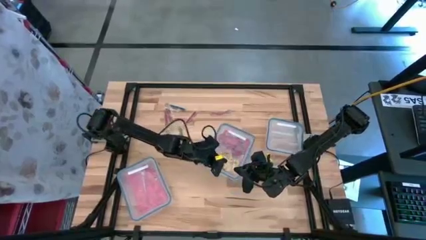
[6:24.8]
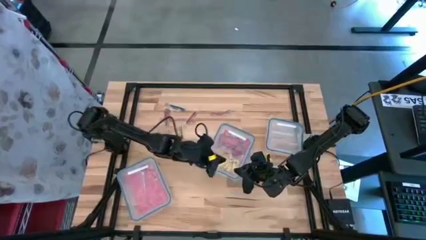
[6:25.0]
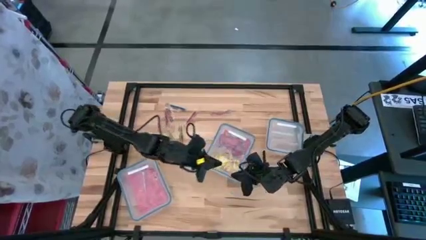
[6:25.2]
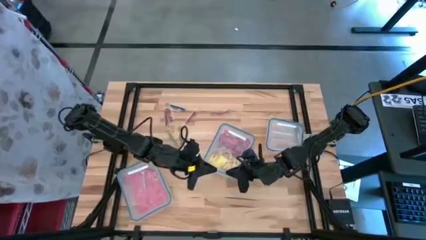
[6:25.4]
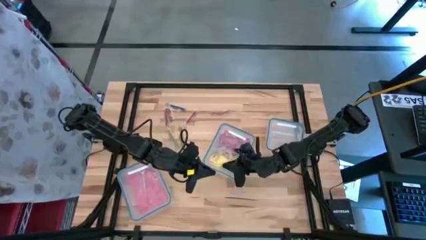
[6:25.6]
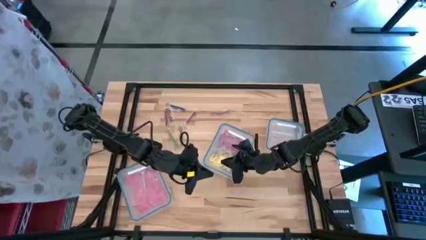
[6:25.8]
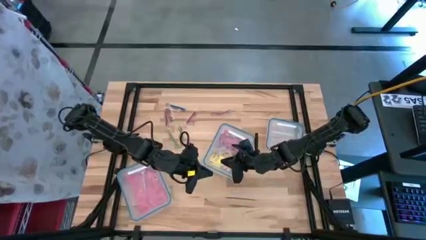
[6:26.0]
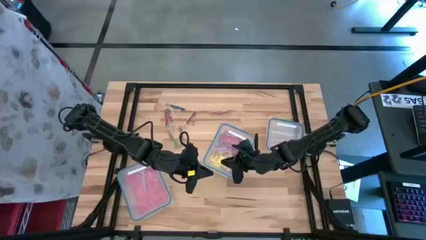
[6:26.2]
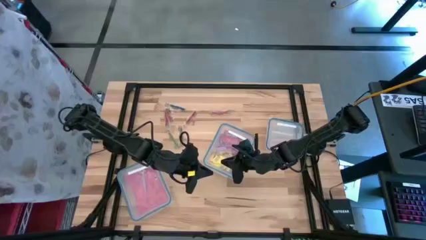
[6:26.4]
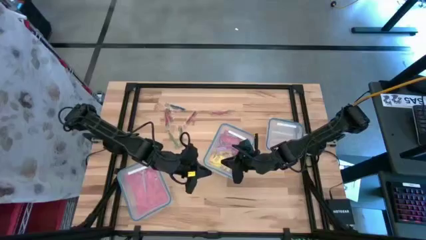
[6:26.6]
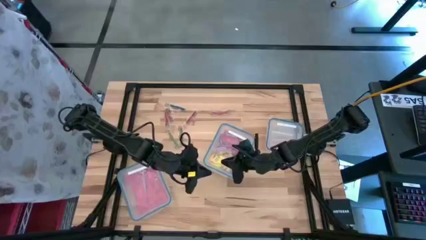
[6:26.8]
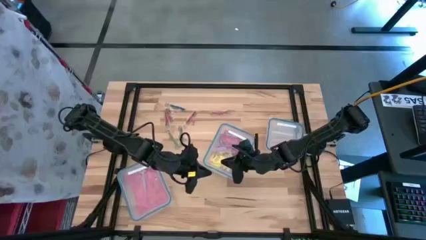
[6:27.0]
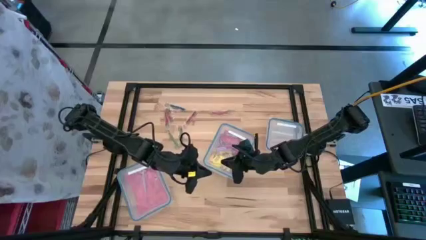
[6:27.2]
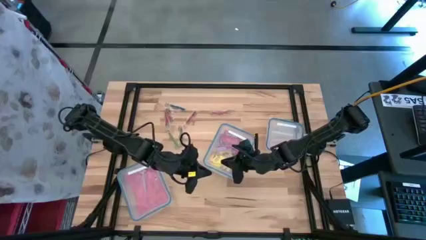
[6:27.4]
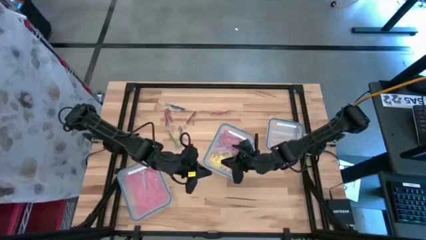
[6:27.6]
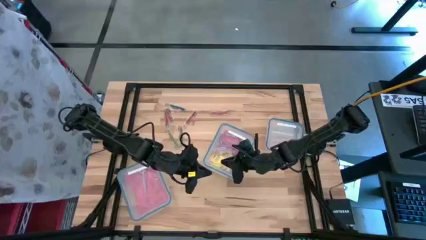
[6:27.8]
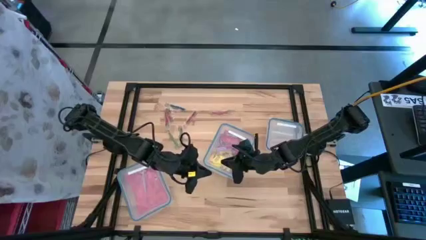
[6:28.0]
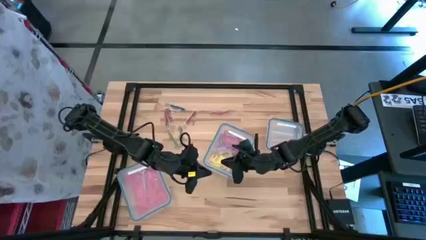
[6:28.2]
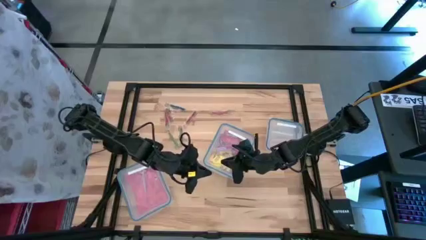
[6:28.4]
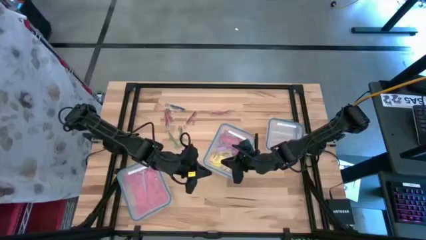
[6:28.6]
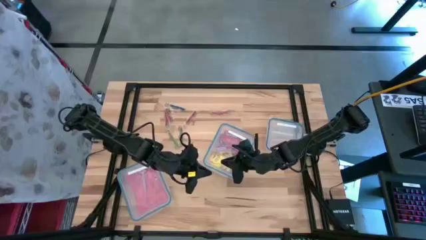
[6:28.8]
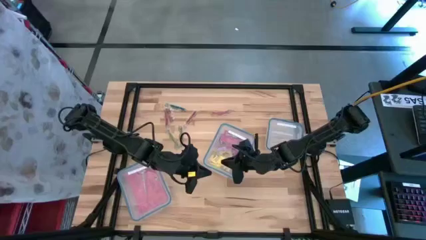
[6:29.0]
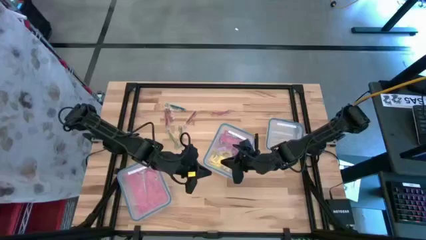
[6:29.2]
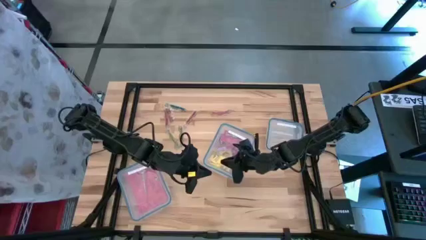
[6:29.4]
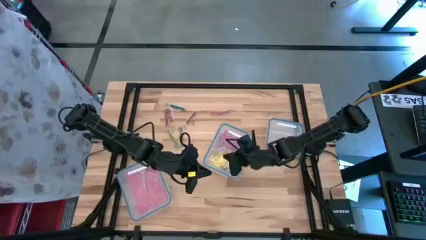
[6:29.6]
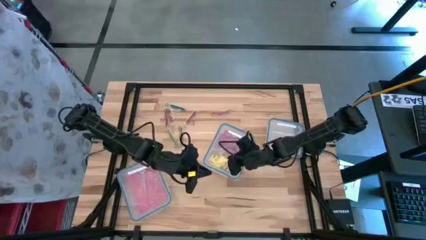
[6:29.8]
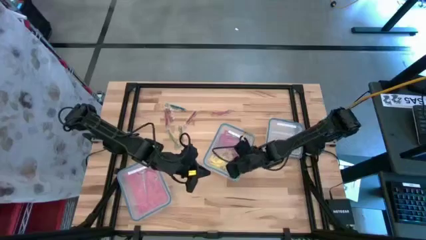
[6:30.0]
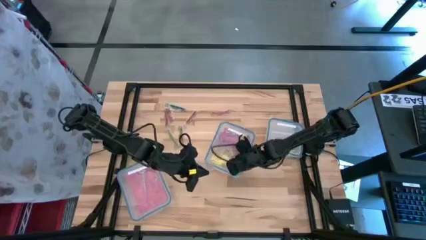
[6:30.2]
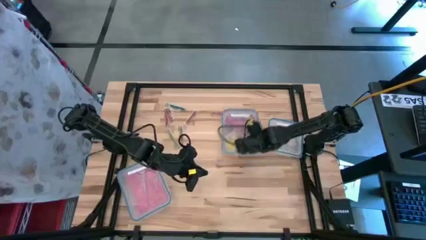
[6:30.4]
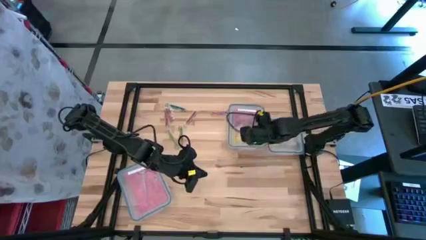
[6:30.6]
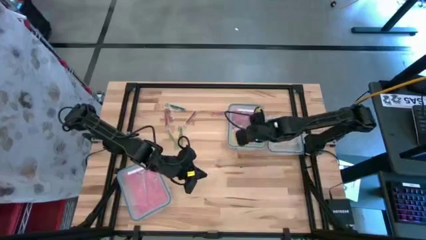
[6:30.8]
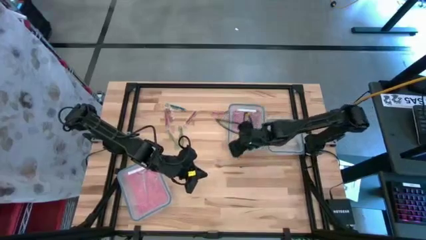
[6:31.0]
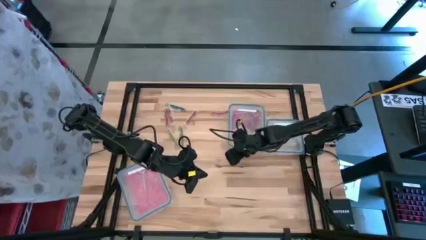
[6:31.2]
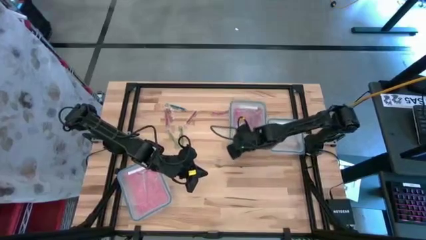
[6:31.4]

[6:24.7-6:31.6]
Task: Sort candy
Move the rectangular transparent bin

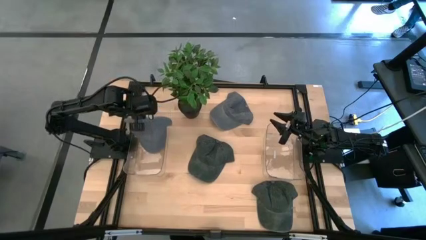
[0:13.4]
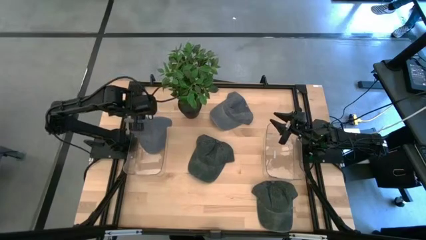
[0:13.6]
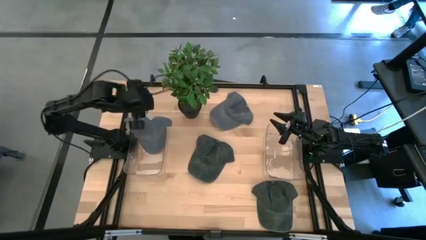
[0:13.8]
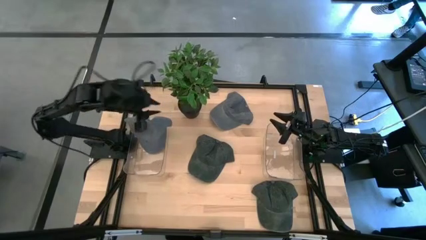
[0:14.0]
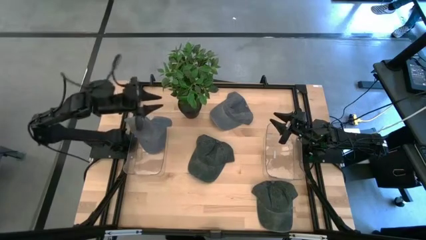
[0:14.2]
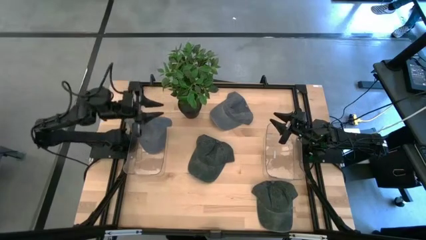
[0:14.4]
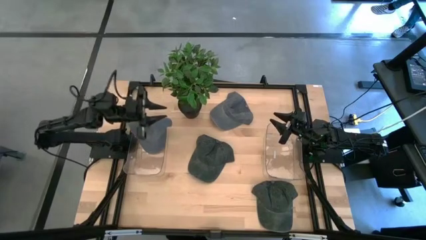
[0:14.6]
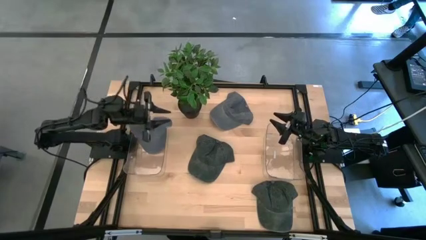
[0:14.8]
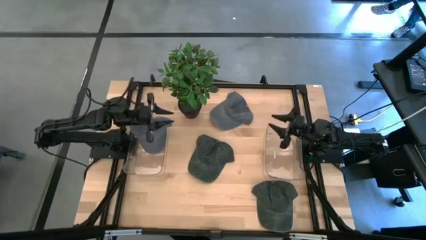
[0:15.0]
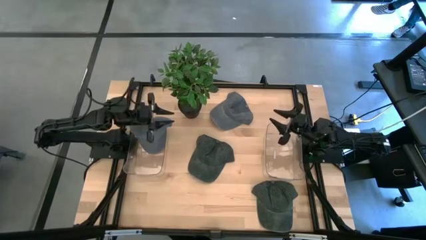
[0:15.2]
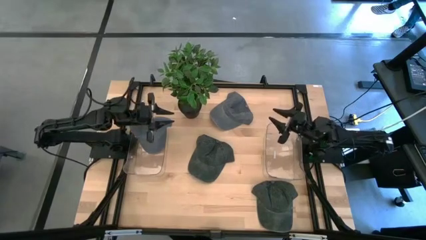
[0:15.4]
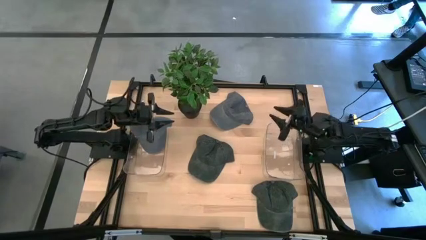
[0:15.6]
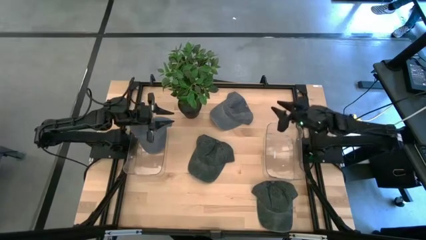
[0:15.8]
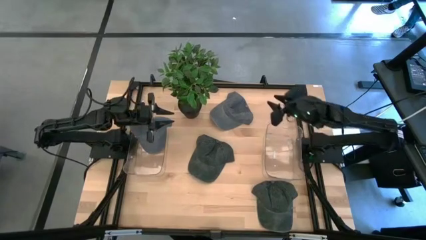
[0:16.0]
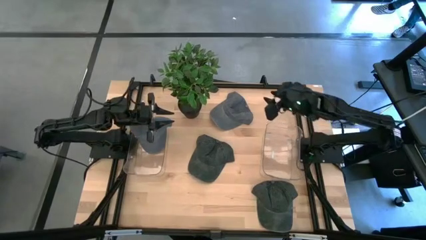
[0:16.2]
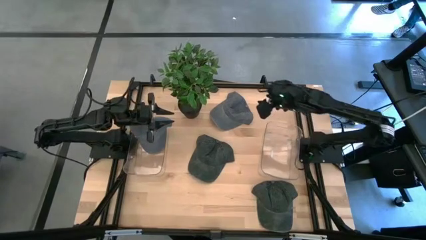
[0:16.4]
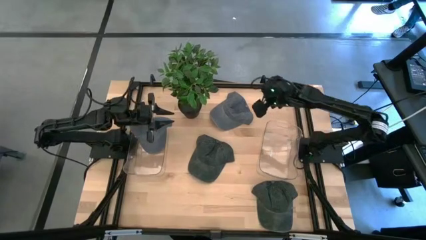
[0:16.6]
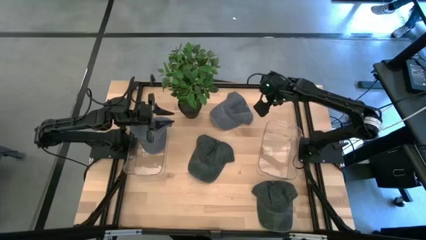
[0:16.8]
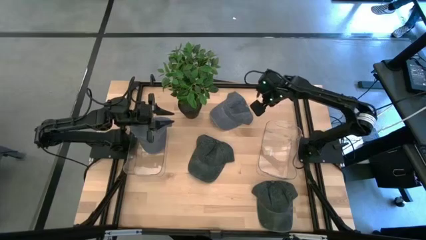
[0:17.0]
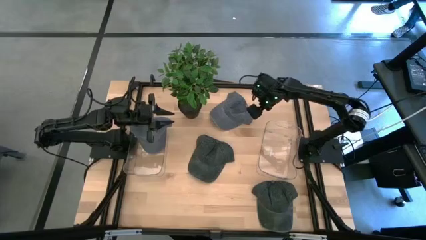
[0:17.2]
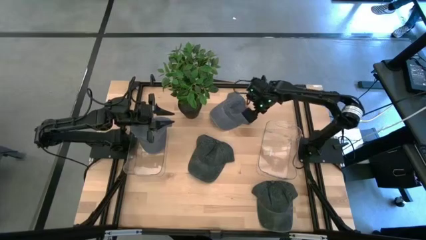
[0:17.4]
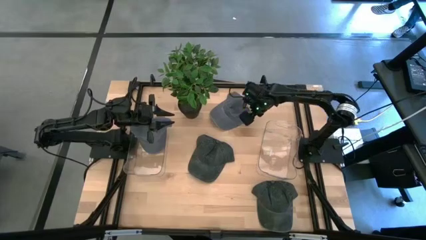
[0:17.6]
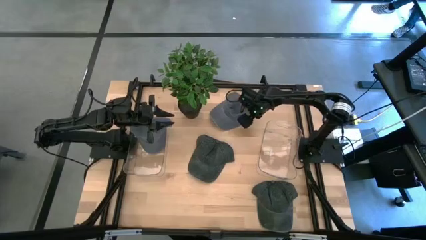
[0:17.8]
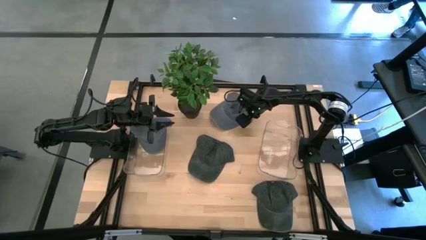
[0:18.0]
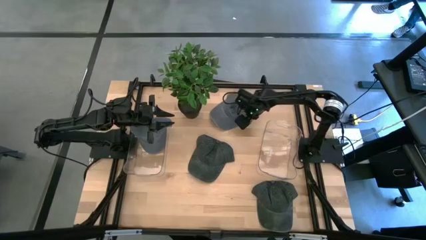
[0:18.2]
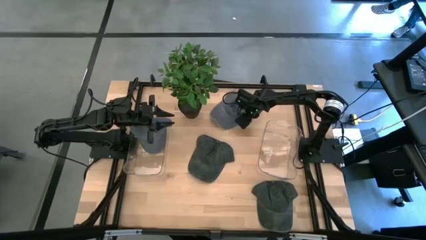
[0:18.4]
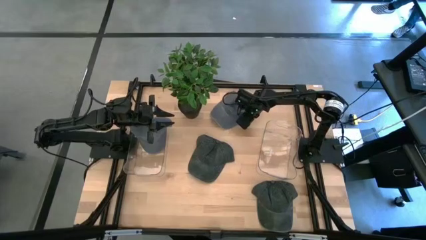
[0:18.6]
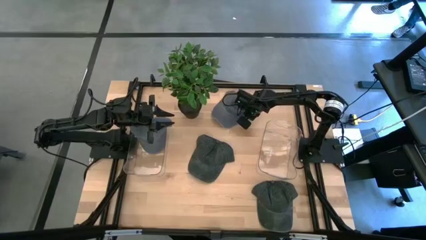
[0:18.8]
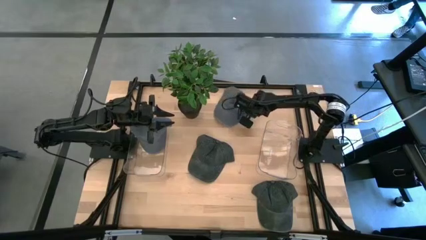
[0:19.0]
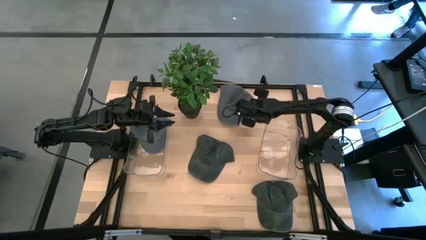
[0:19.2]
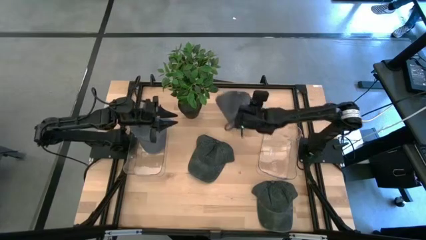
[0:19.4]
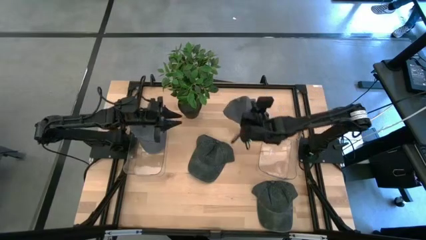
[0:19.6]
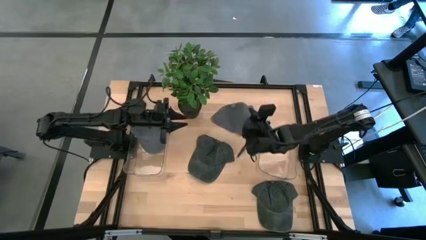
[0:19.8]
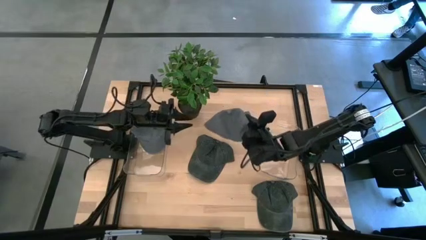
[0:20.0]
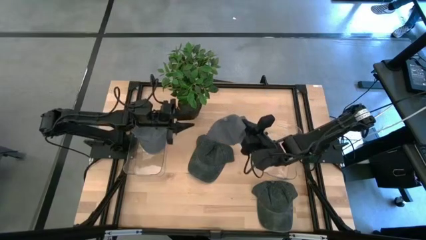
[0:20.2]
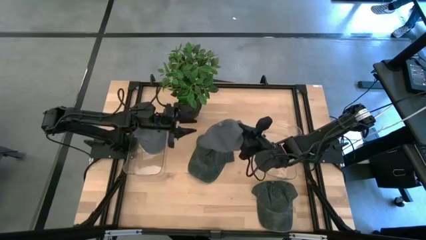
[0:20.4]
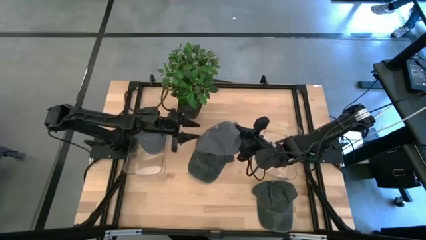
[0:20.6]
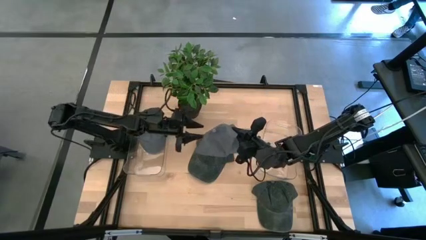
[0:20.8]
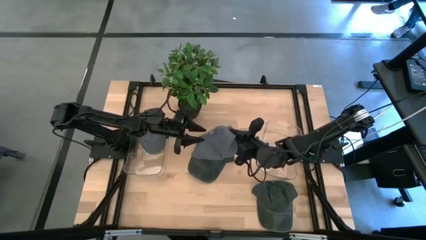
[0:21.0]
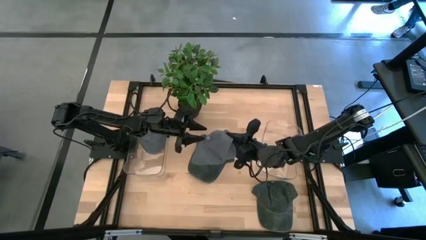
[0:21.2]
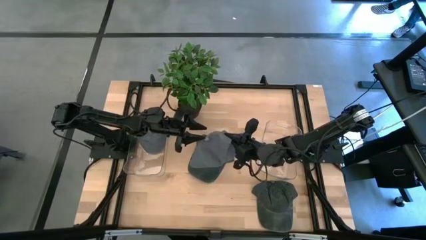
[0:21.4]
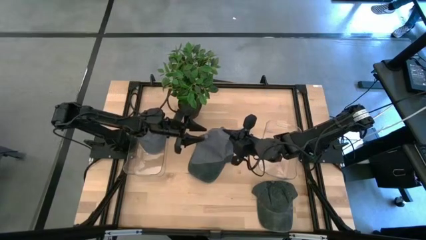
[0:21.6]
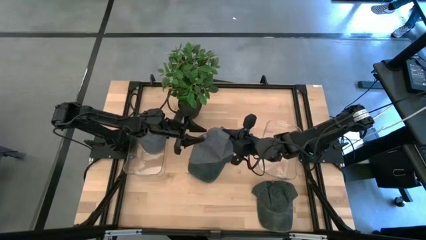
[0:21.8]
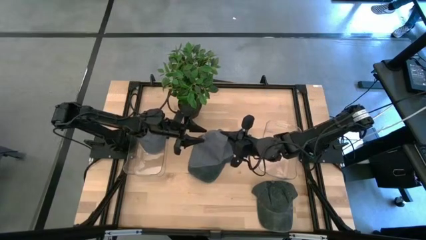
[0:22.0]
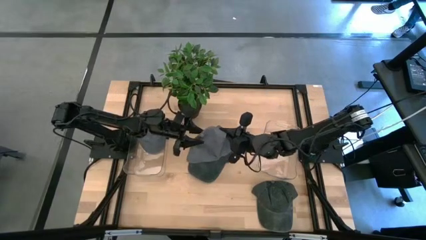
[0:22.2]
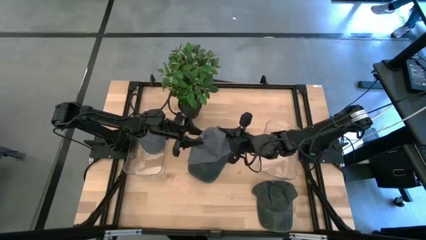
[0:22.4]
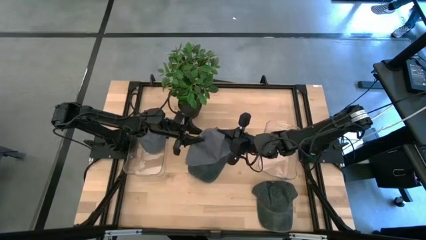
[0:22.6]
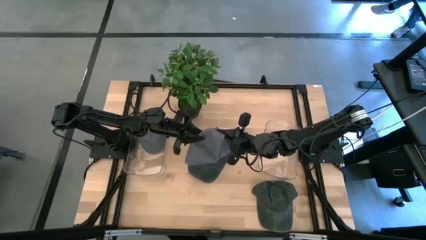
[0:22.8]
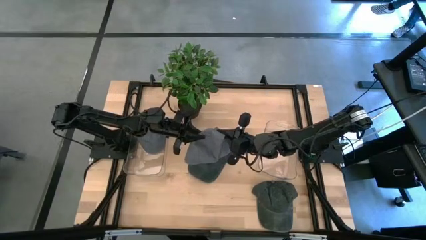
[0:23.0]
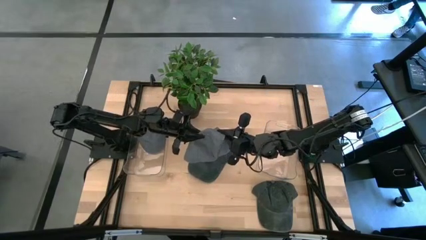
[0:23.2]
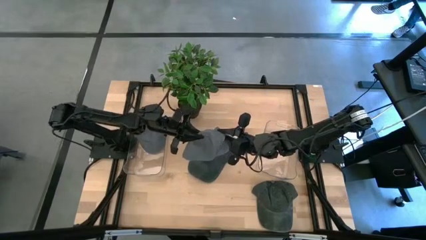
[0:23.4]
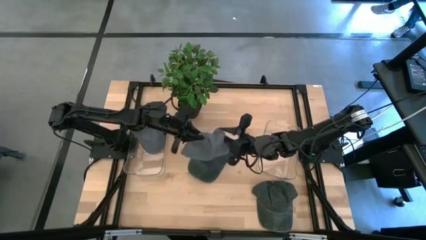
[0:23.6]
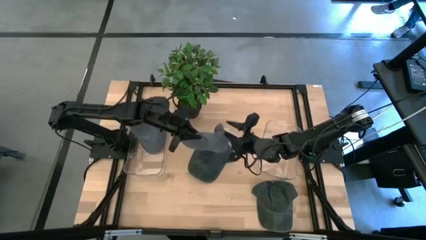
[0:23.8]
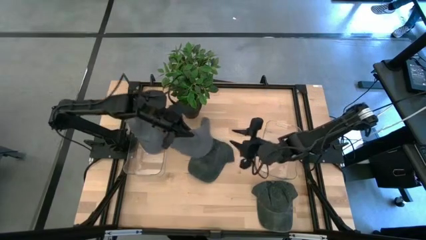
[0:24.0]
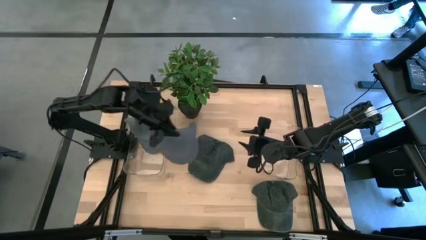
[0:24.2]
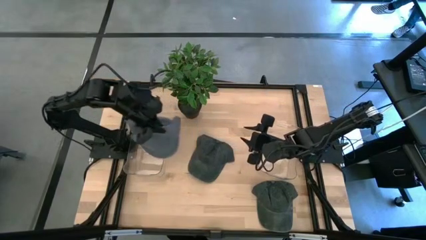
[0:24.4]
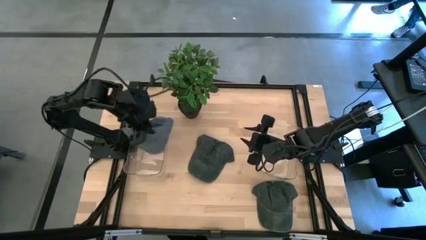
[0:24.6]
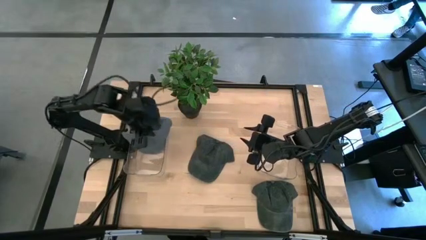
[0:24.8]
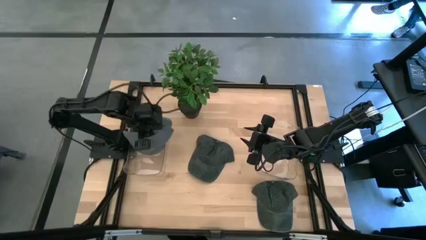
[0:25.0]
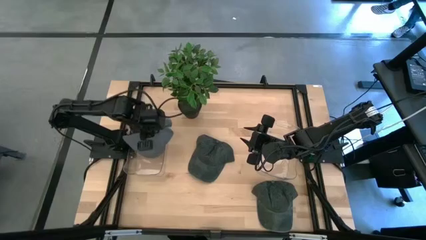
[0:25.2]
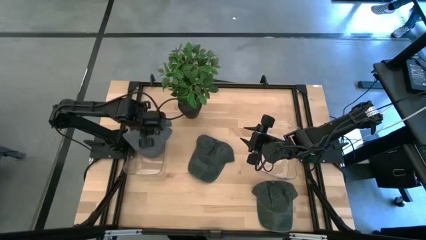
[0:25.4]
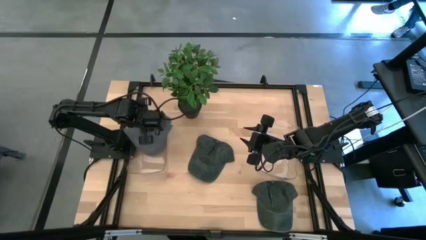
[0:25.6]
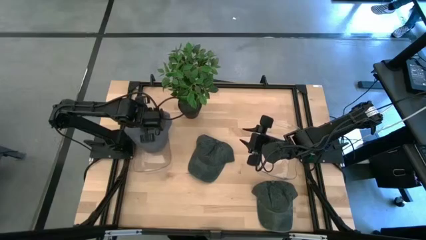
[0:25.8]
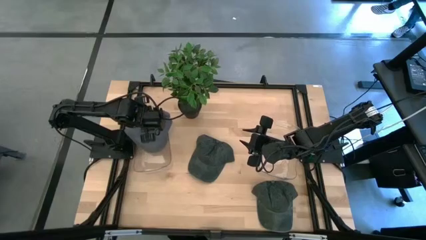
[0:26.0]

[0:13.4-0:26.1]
Task: Pick & Place hat
Put the gray cap into the left transparent bin
